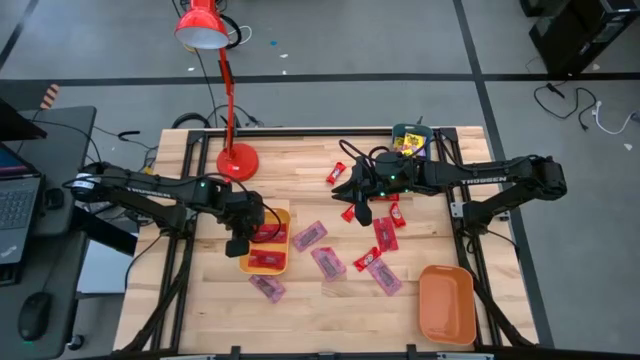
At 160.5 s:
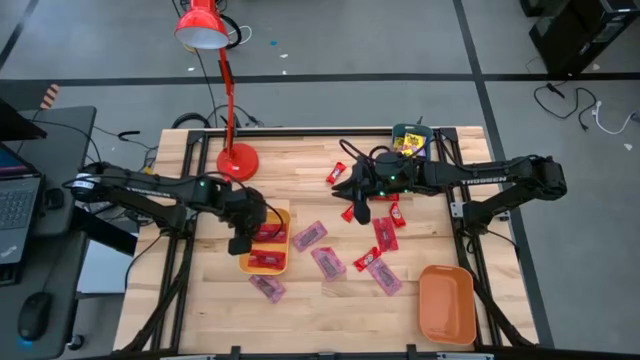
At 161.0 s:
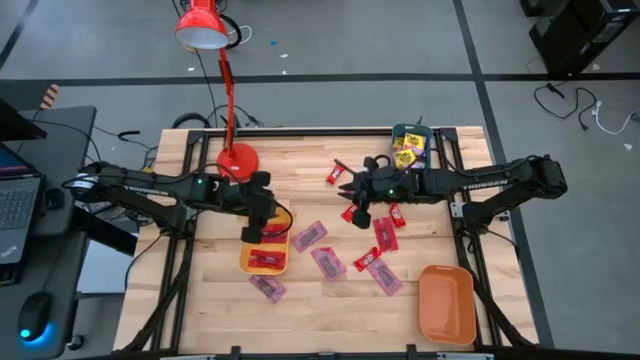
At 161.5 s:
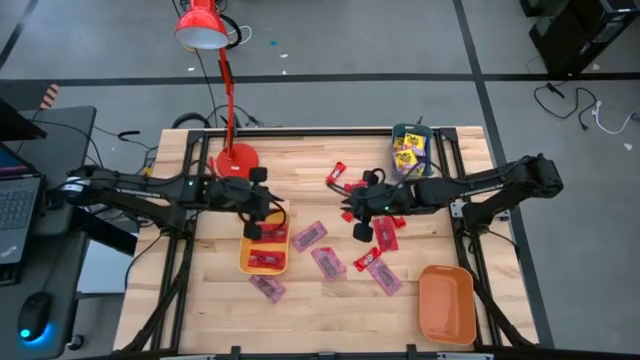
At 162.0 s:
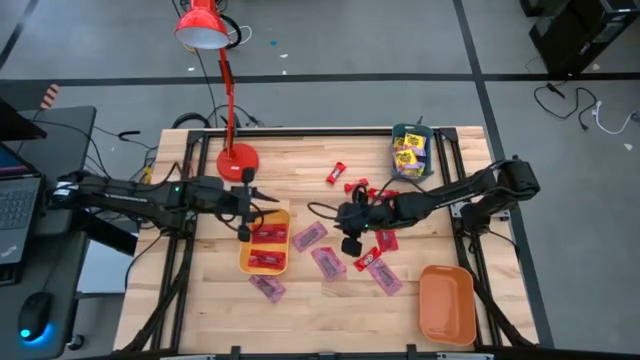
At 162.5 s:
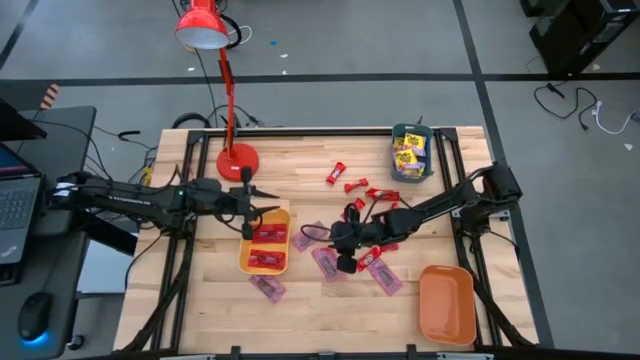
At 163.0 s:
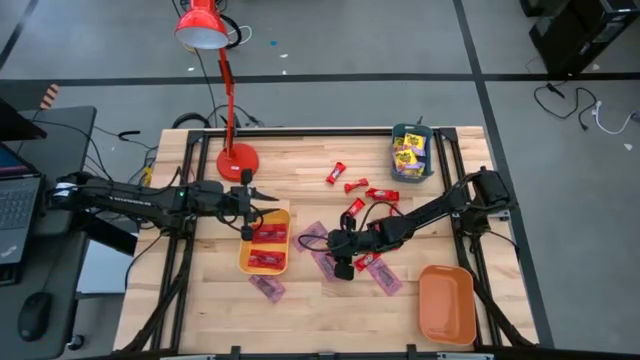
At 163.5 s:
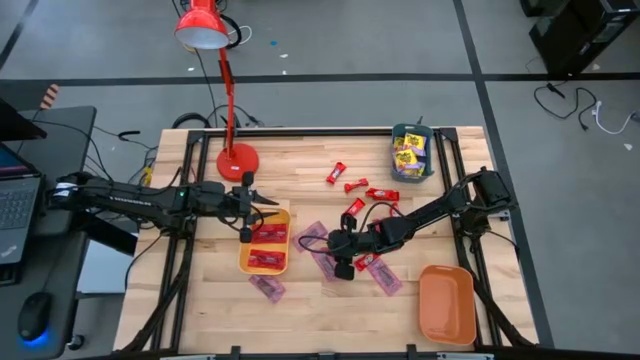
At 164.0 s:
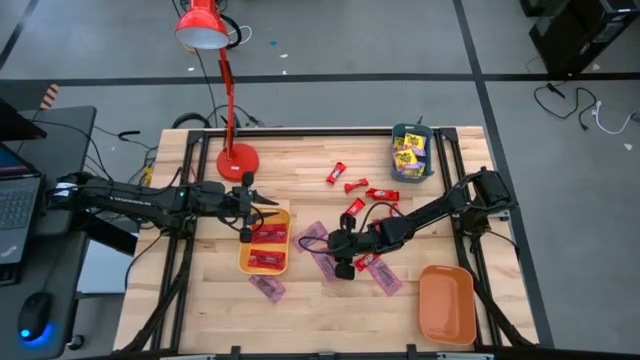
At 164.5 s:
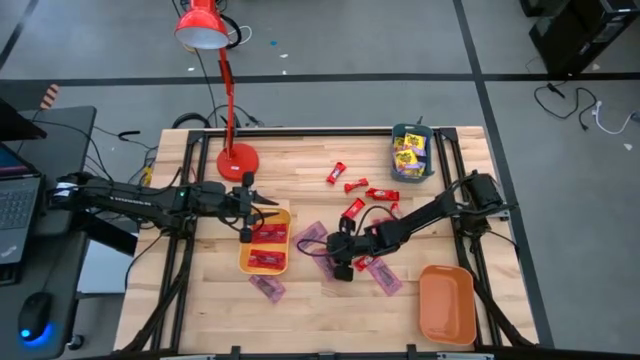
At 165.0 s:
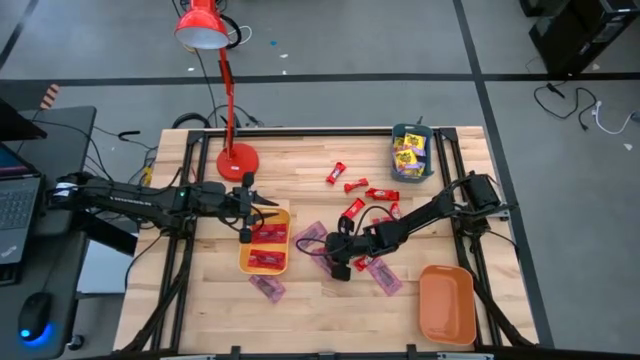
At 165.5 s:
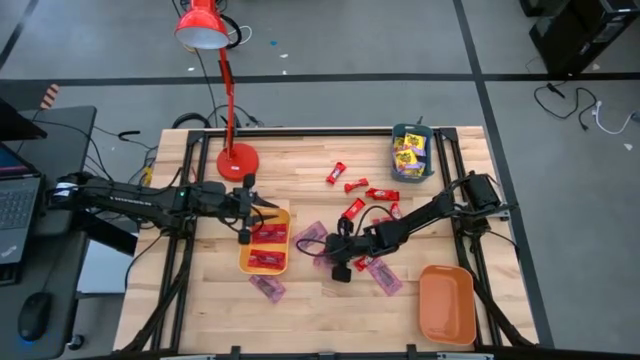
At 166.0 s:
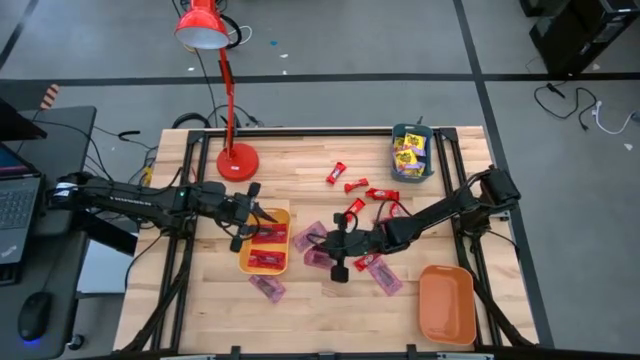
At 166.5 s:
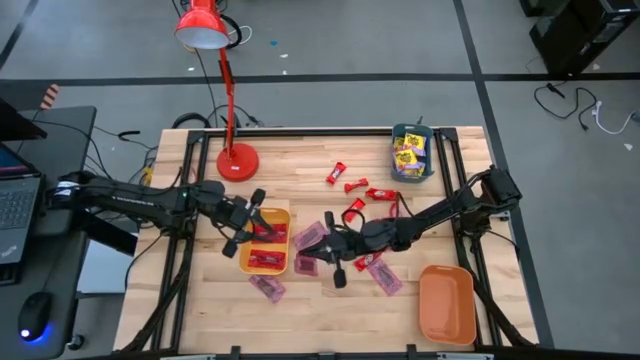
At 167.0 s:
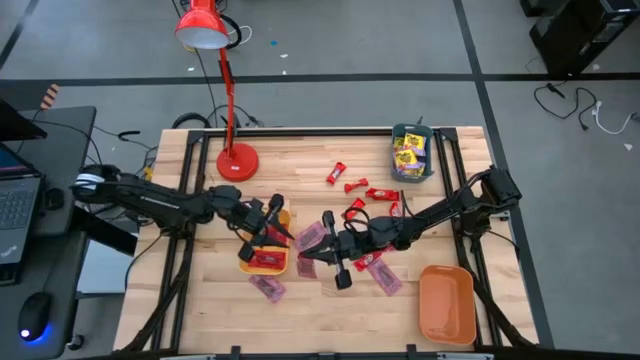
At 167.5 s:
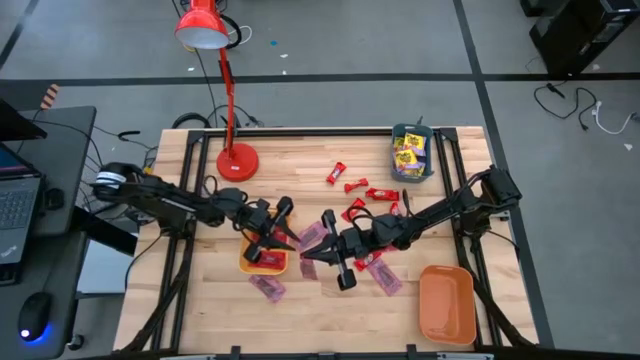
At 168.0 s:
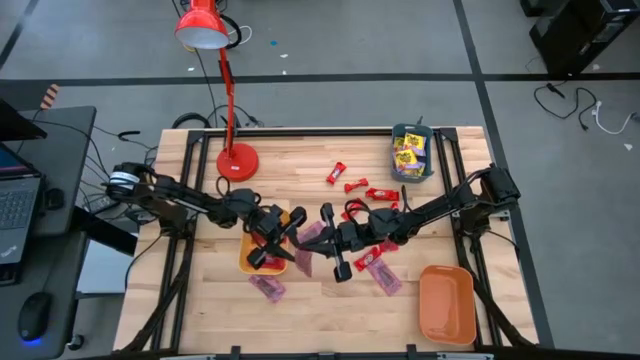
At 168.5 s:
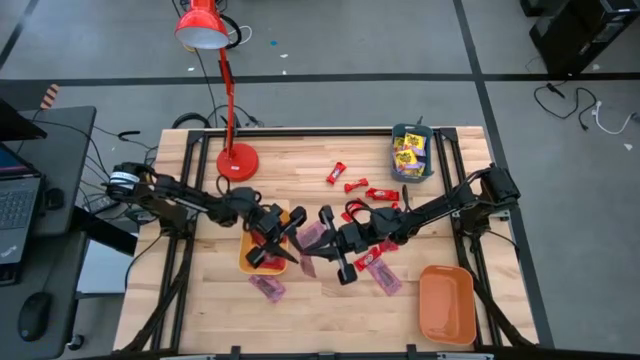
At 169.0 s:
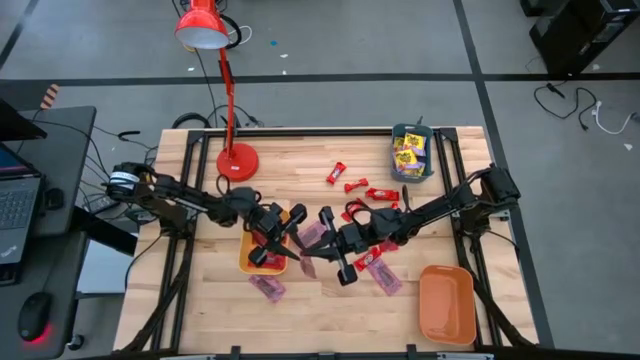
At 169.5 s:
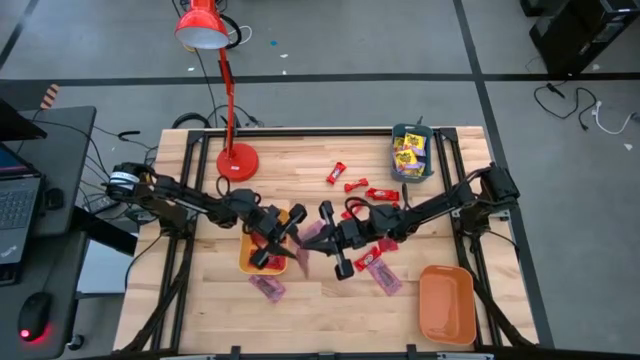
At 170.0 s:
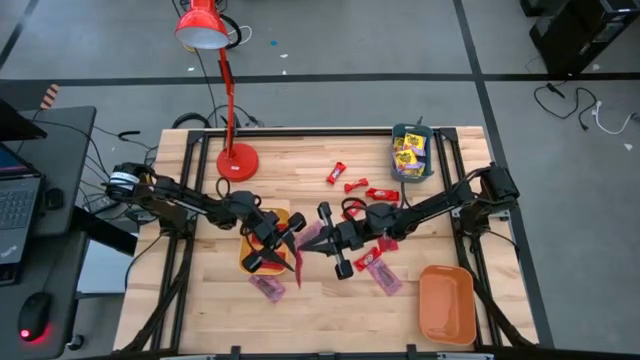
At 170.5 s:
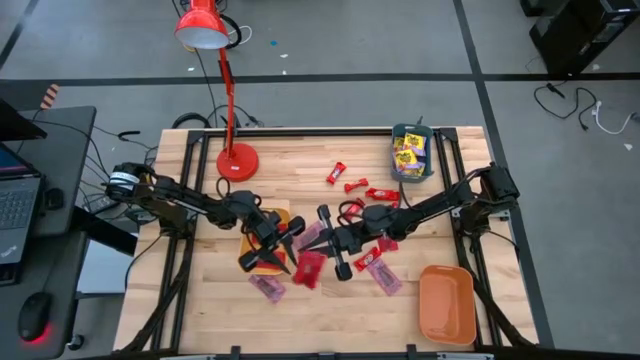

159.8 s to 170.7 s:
Task: Sort candy
Put the red candy pack into the yellow bin

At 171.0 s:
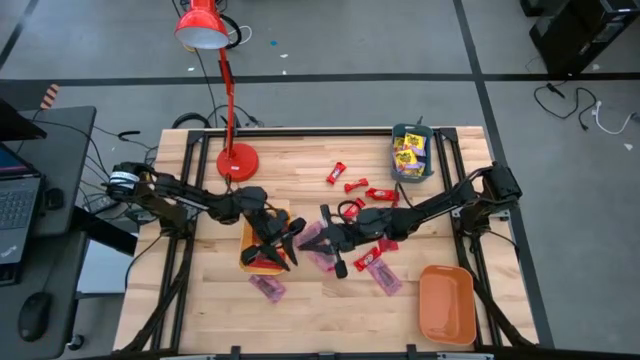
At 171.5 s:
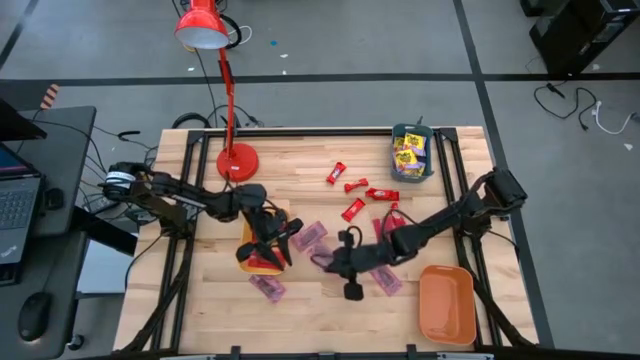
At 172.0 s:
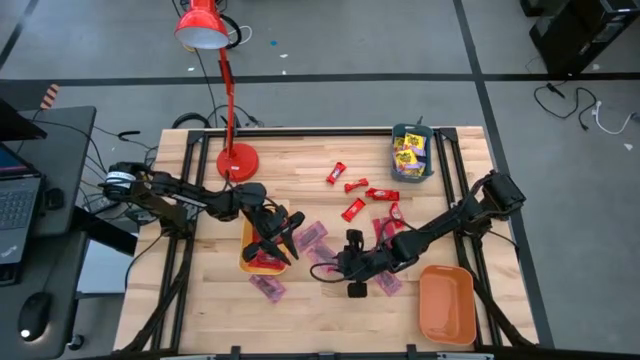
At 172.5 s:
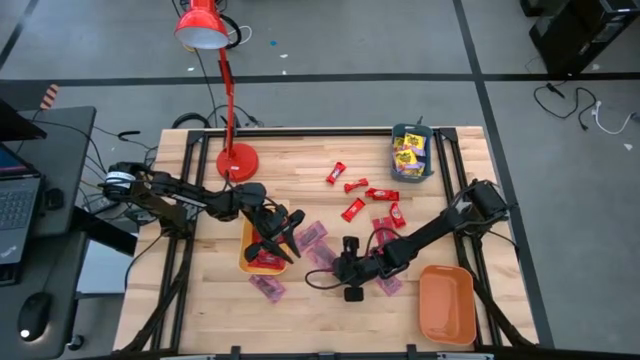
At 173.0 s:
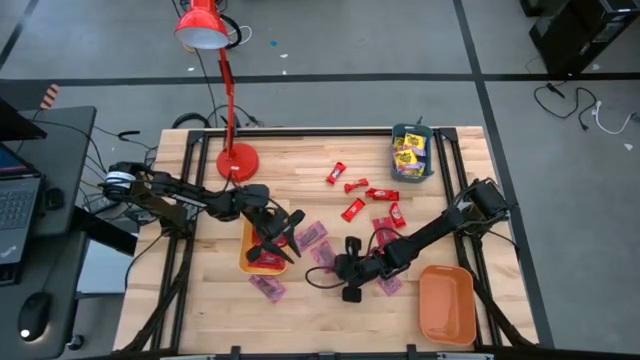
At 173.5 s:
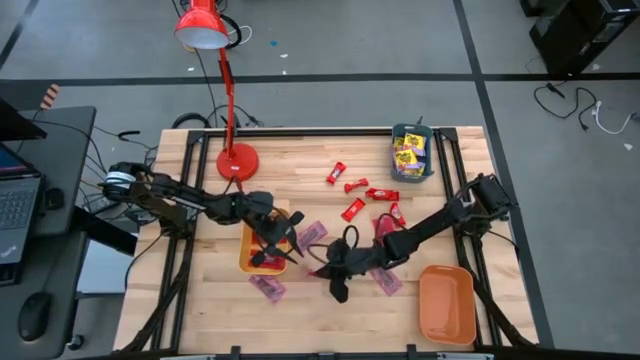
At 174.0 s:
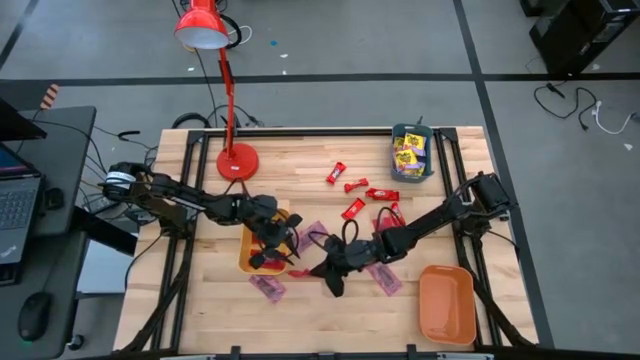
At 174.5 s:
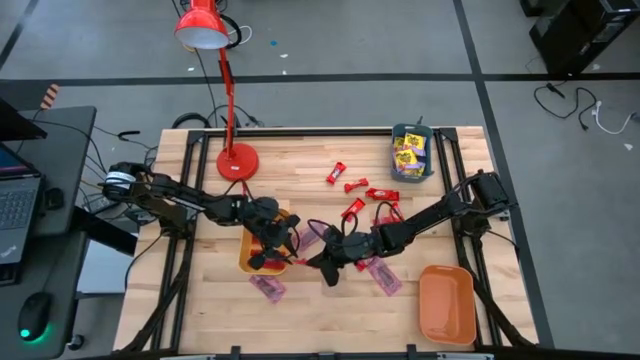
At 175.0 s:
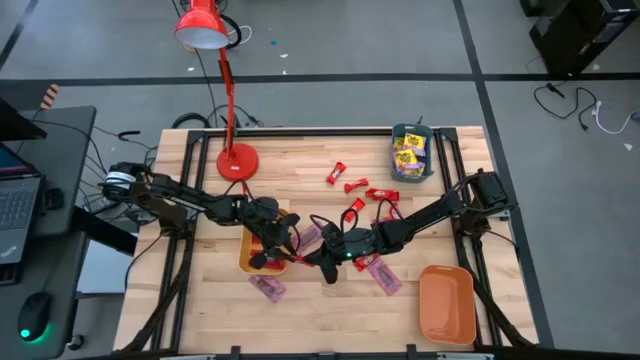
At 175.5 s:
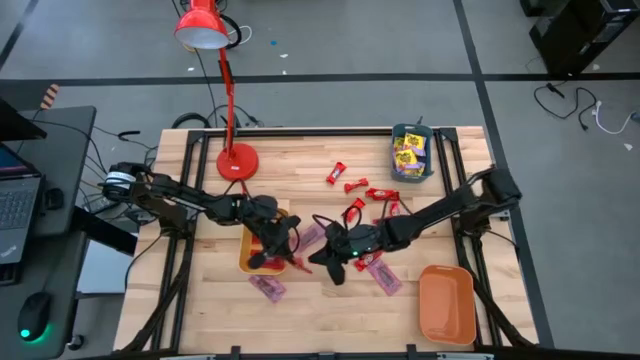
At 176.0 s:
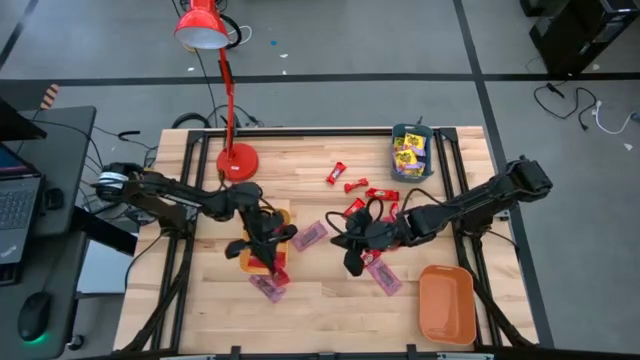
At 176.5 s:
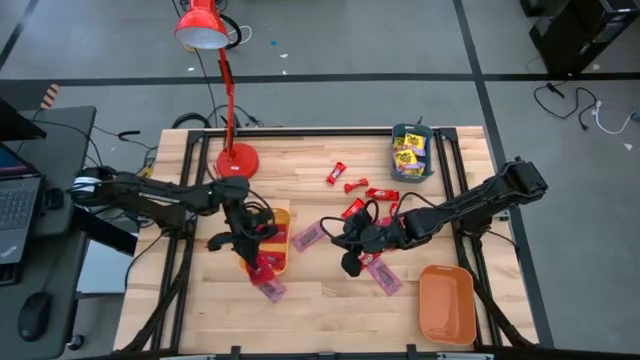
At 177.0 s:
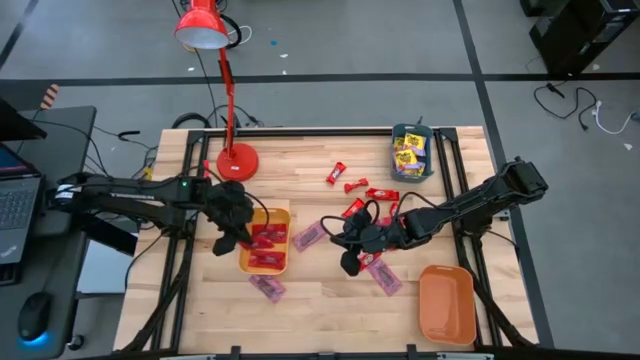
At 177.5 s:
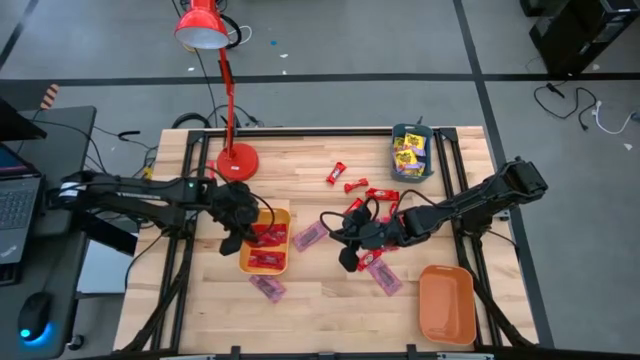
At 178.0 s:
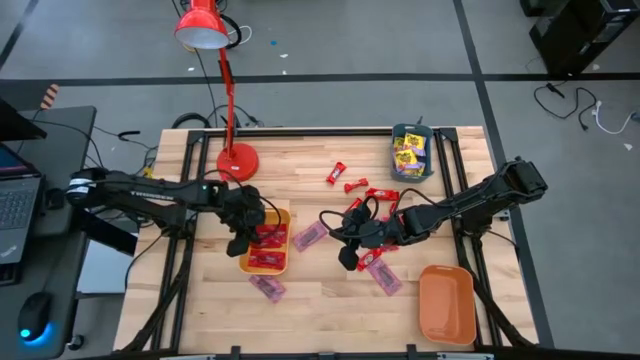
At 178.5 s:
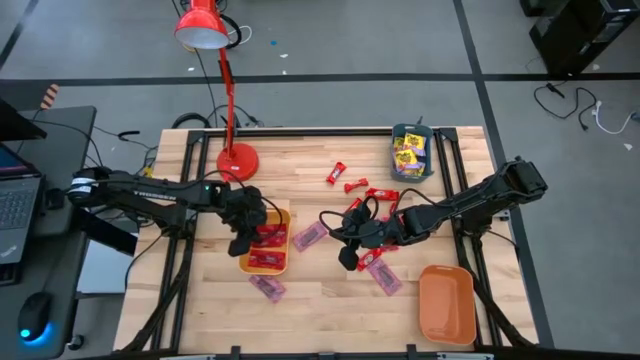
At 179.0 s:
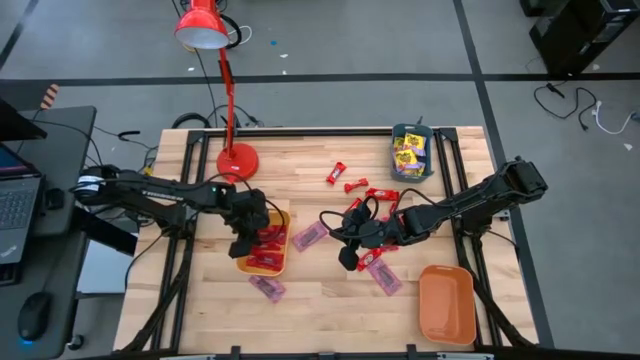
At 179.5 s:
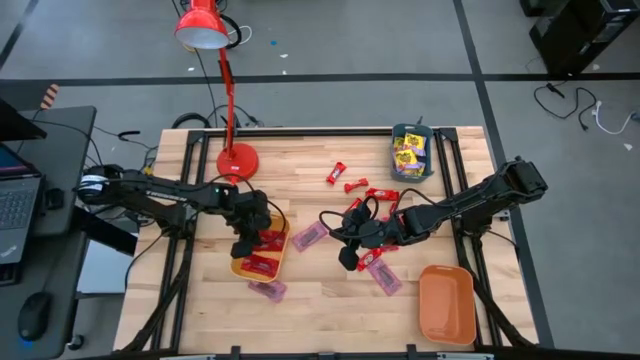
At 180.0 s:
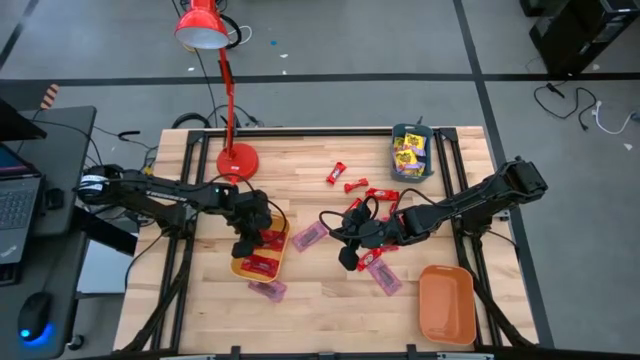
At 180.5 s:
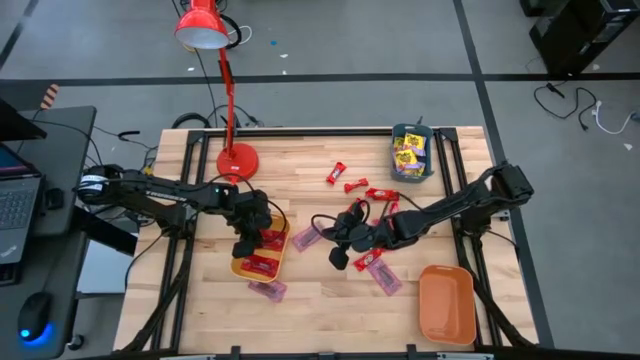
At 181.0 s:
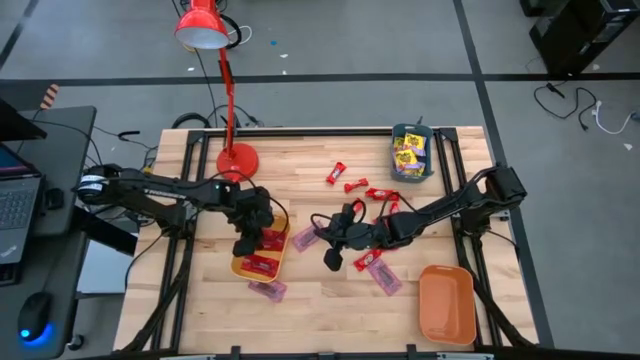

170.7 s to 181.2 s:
Put the red candy pack into the yellow bin
